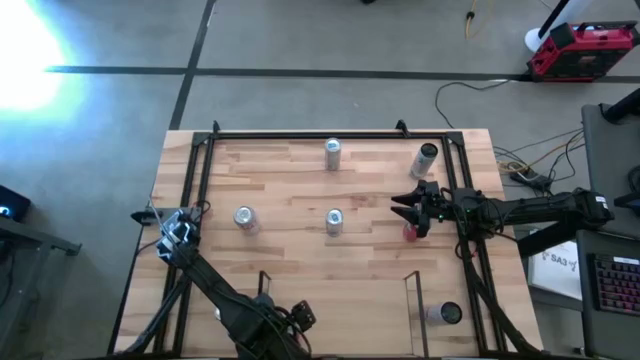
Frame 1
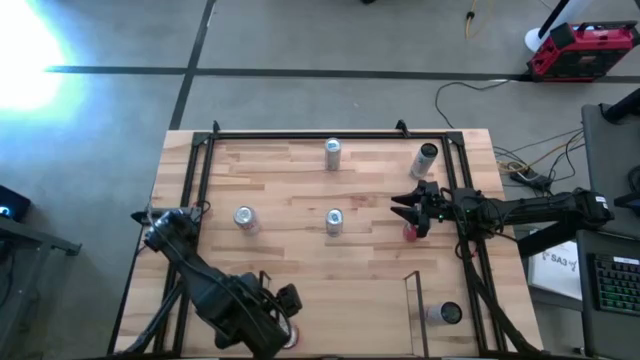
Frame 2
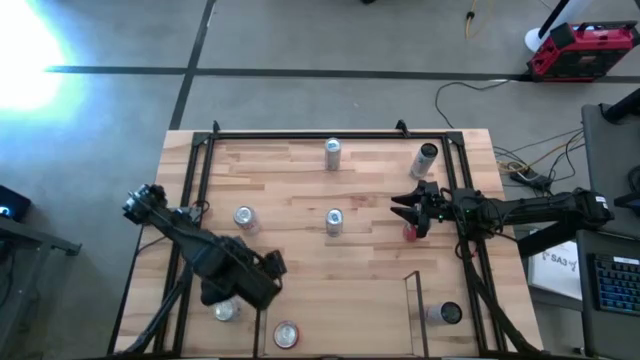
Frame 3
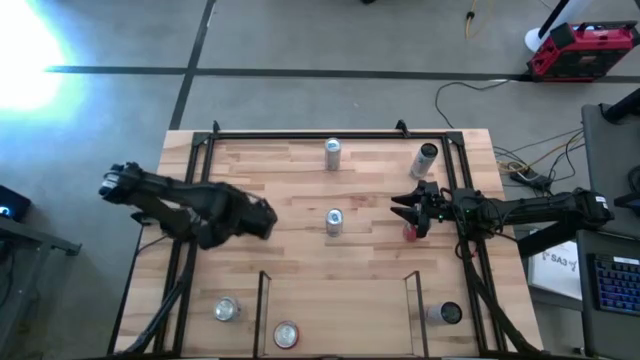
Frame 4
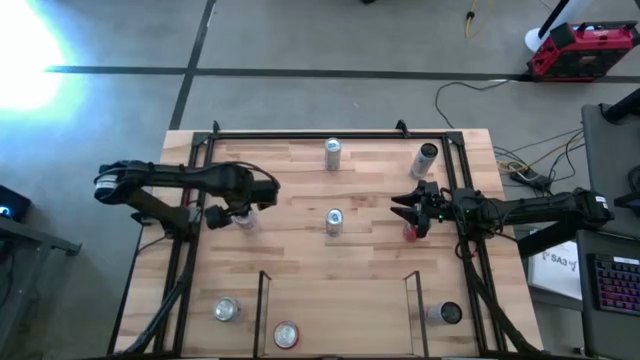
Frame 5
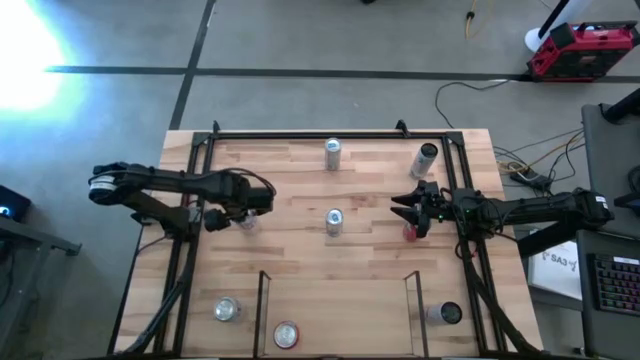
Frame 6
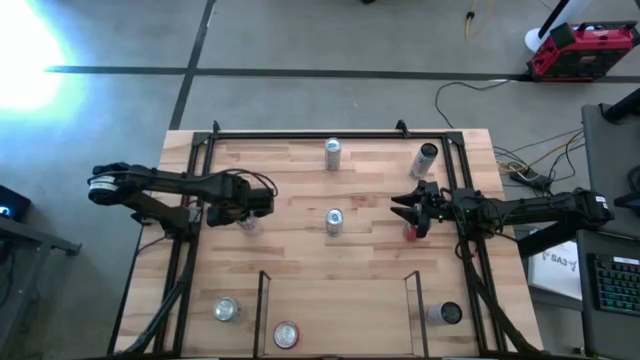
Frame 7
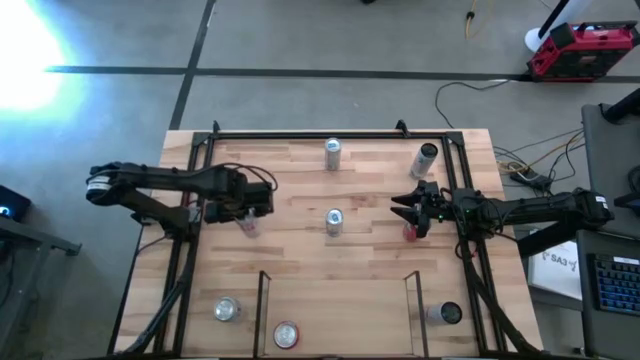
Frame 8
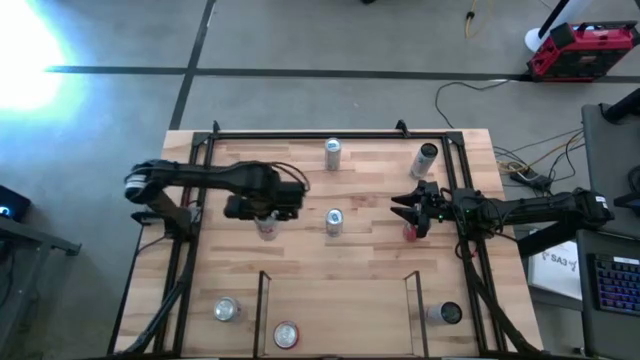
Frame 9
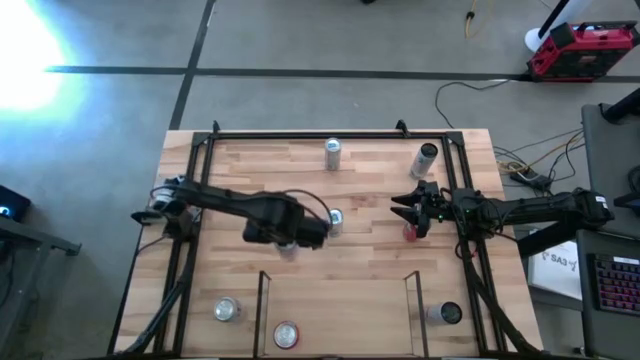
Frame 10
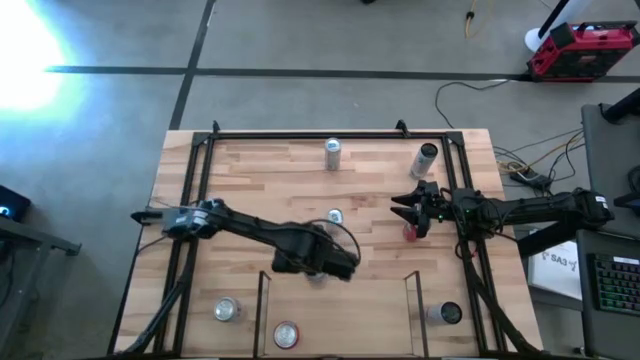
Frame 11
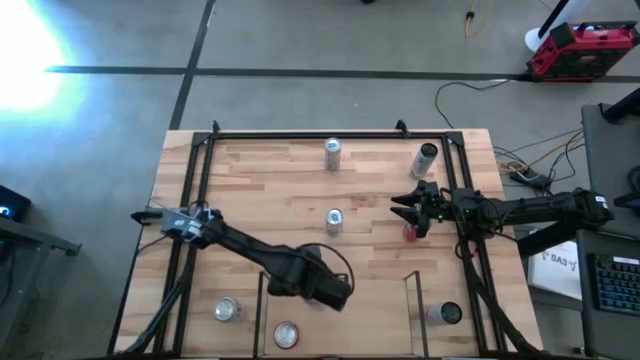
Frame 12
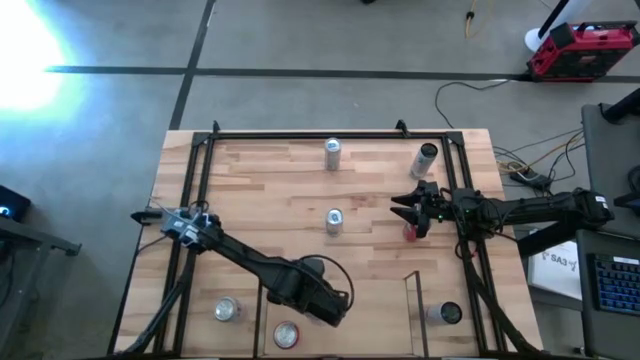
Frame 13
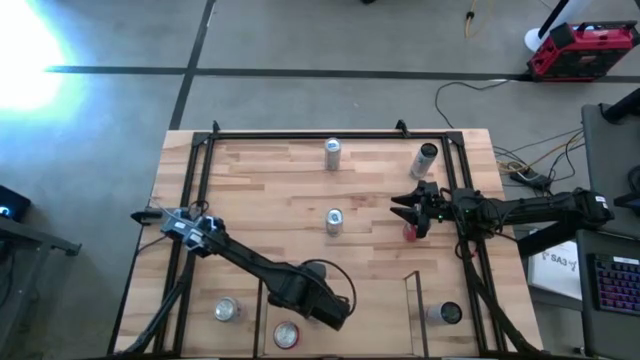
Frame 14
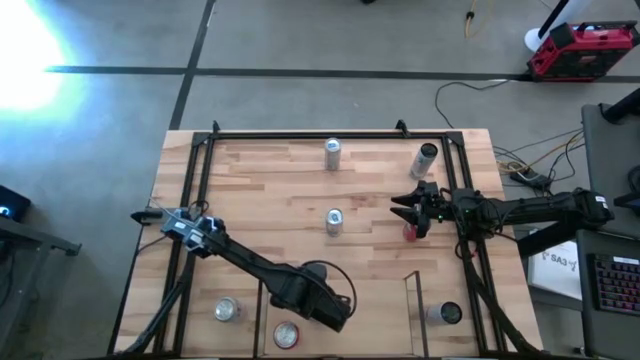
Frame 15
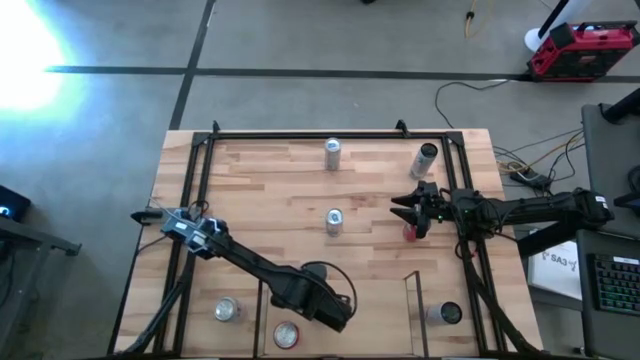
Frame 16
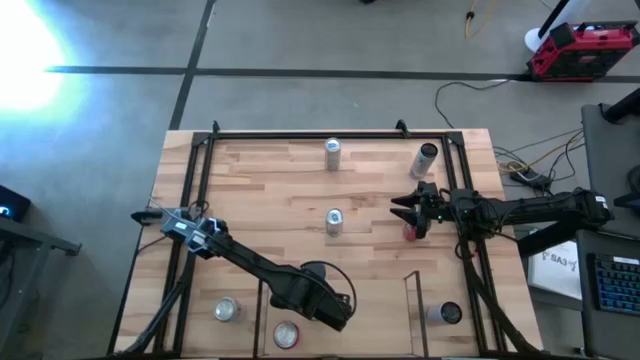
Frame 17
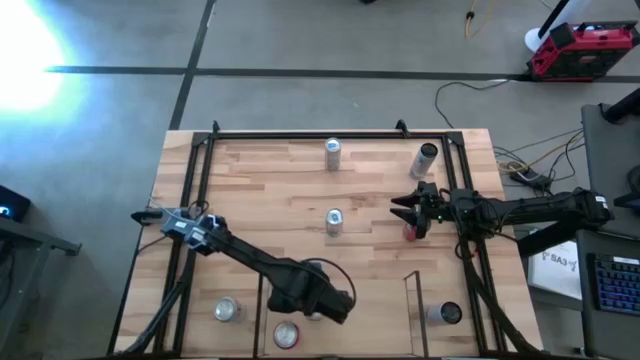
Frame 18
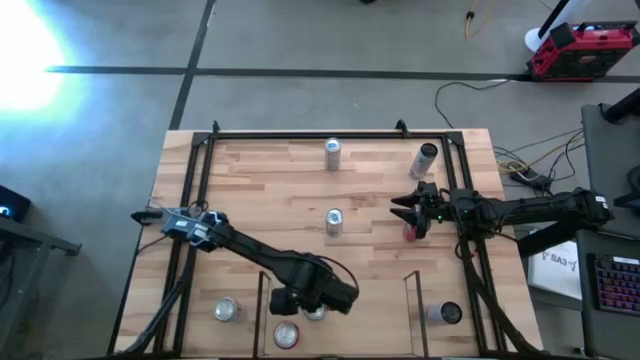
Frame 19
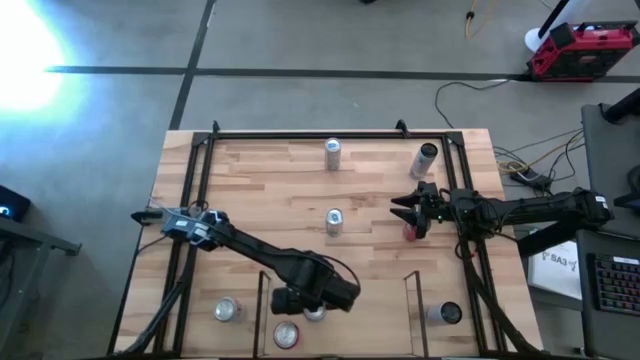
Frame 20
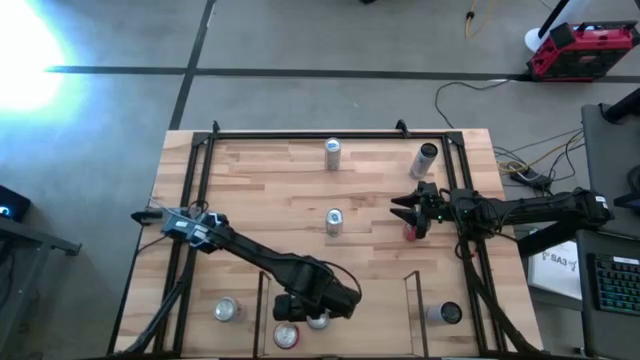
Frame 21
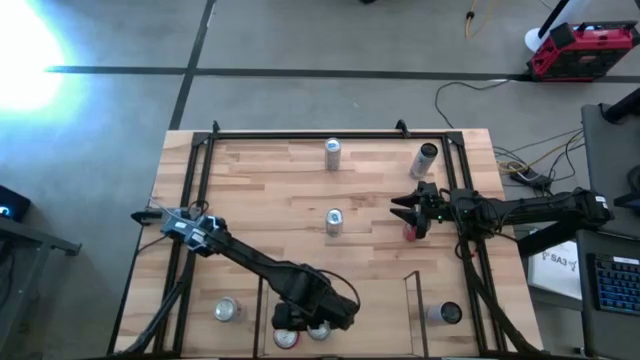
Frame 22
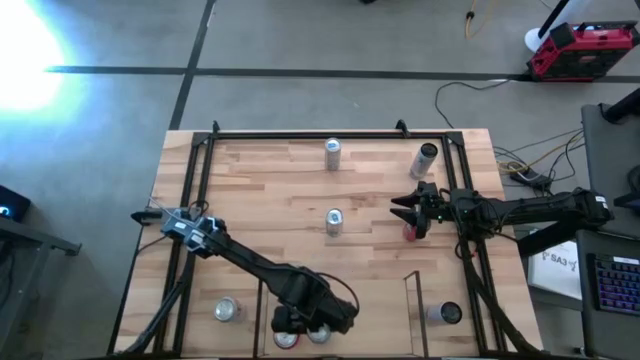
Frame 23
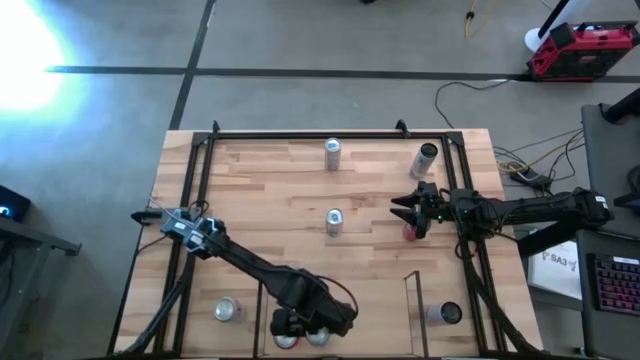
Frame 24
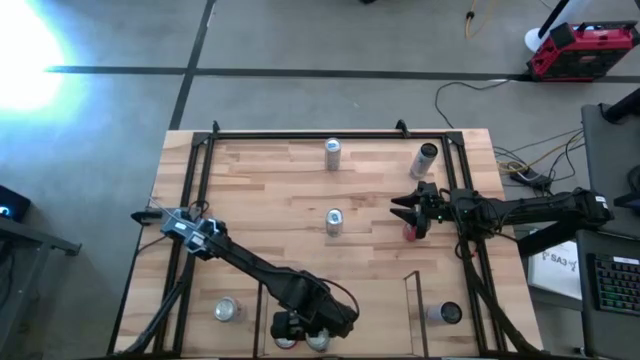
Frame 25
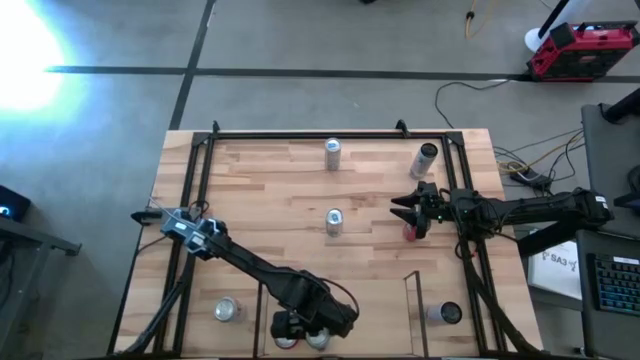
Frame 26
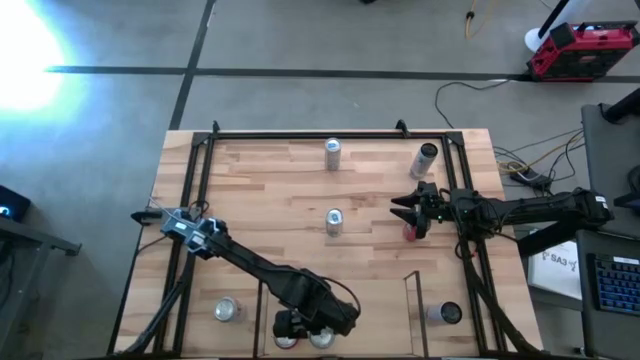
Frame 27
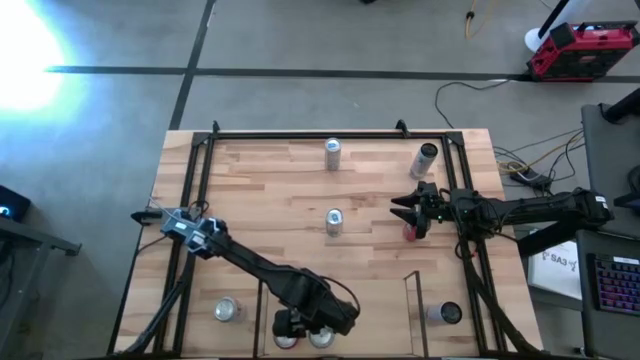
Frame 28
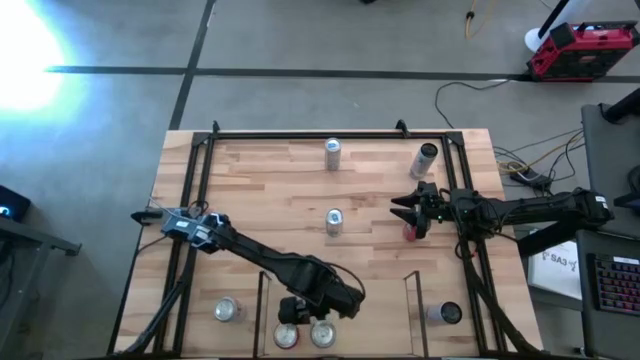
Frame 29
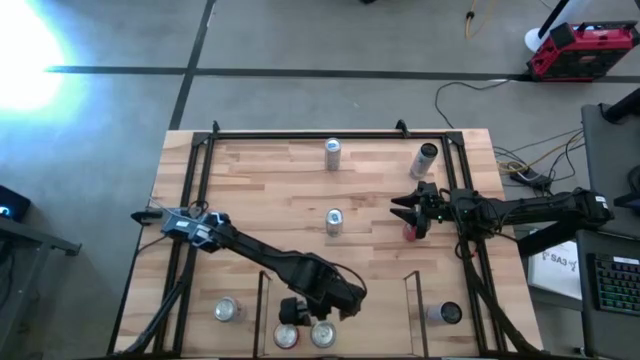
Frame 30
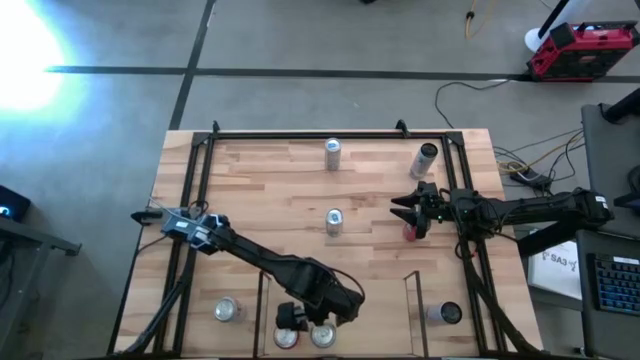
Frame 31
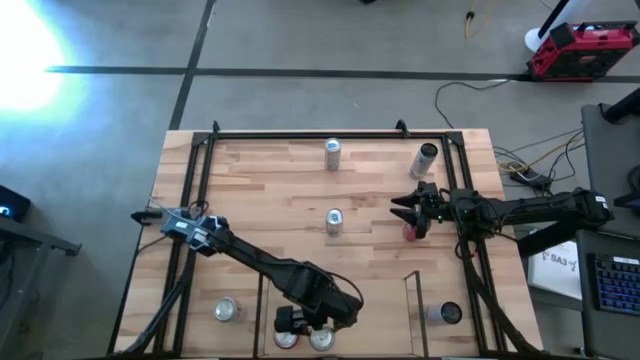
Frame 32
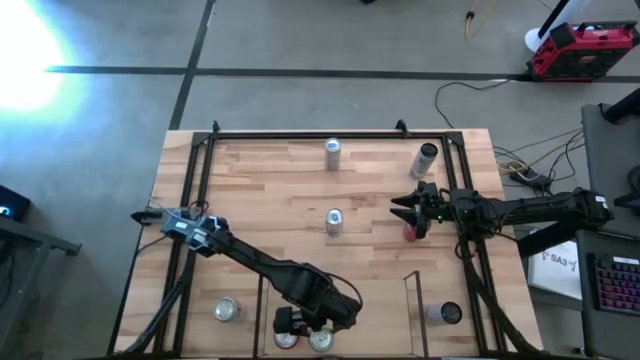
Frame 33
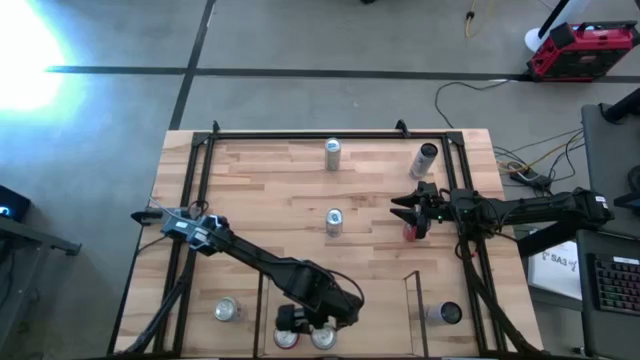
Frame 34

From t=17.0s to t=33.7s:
Task: Place canned beverage on shelf
Put the top silver soda can on the shelf

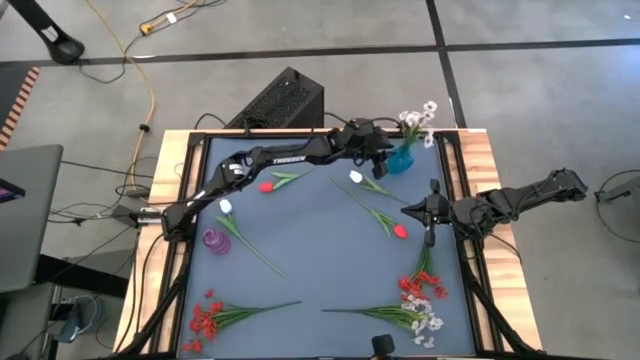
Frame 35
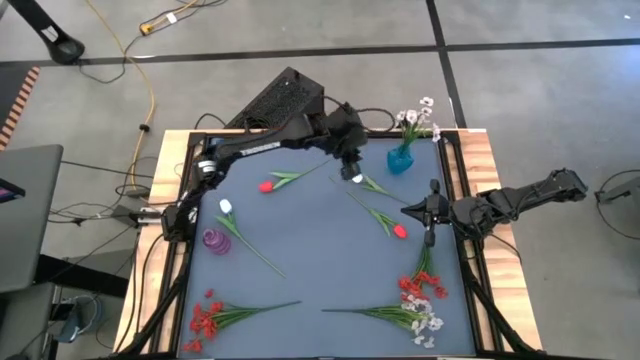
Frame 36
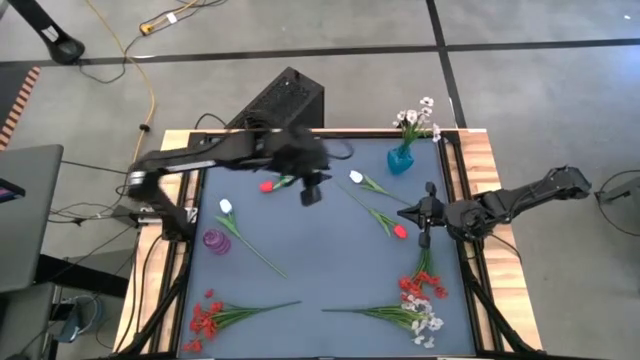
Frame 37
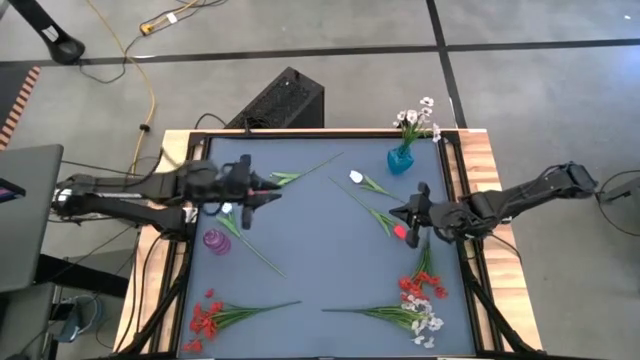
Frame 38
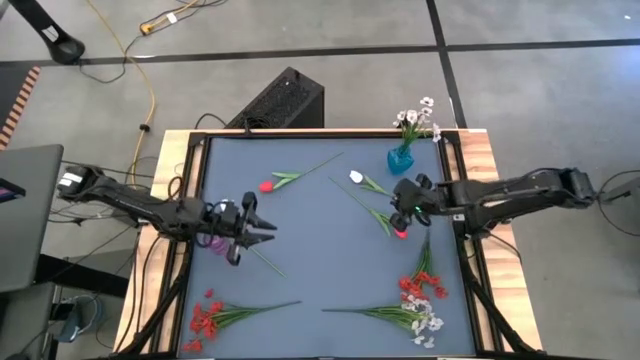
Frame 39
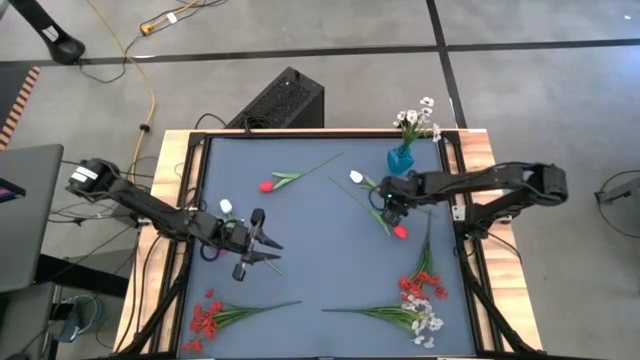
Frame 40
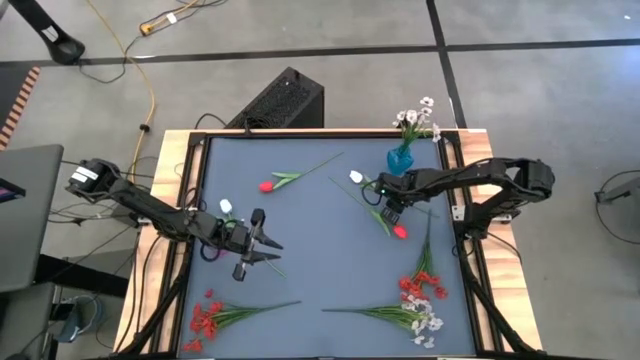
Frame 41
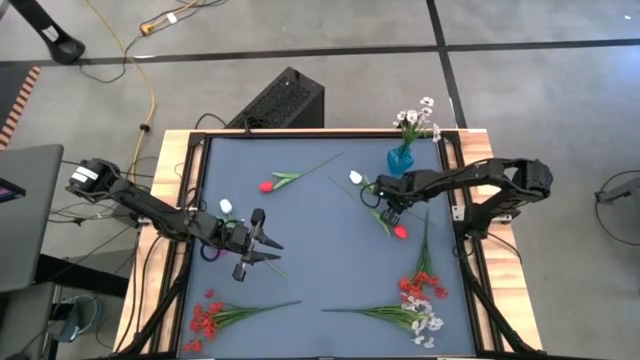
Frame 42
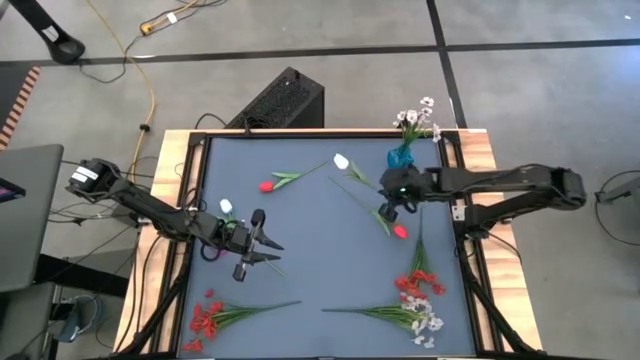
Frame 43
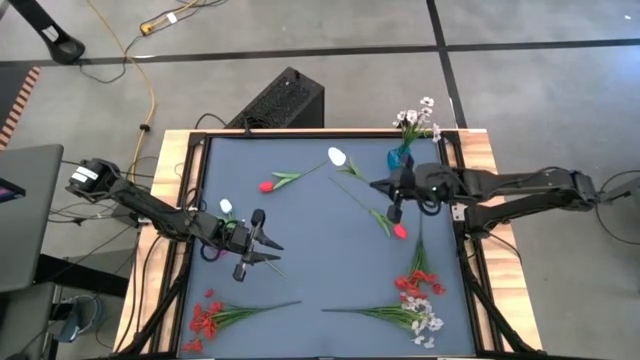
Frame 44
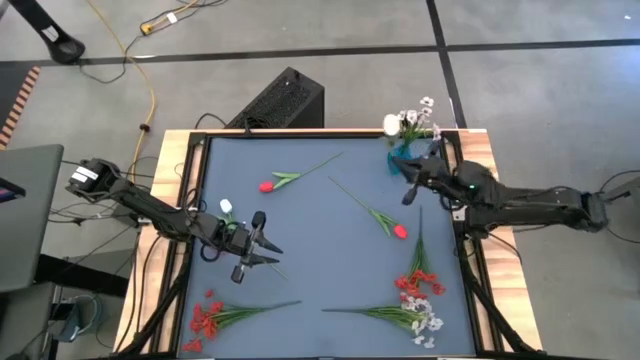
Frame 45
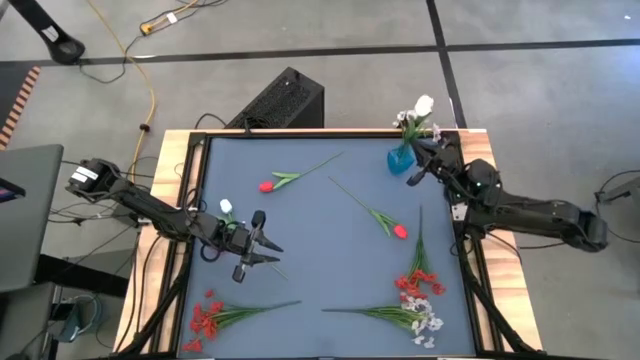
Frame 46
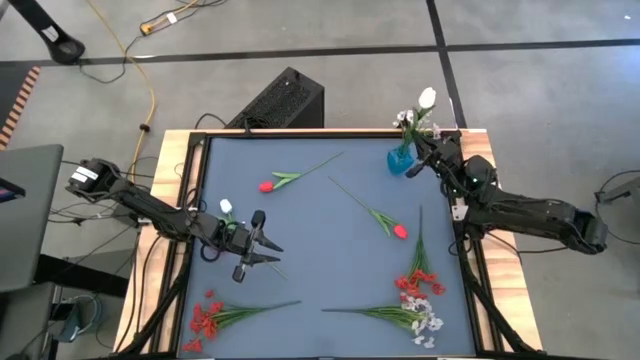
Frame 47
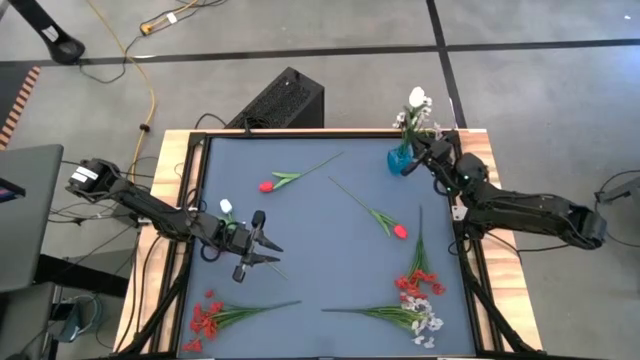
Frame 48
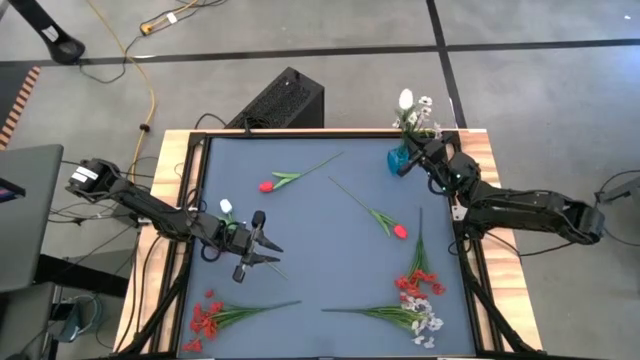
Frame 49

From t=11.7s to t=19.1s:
Task: Sort flowers into vase by color
Put the right white flower into the blue vase
